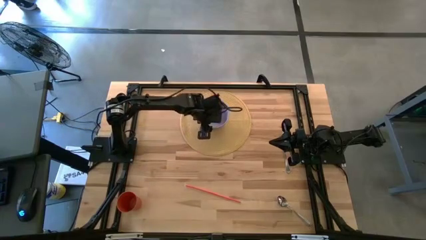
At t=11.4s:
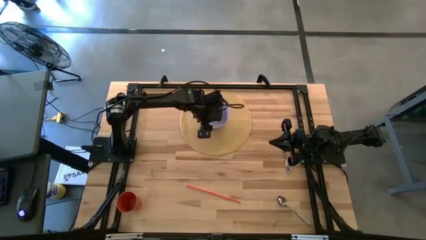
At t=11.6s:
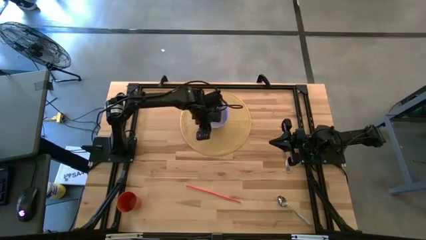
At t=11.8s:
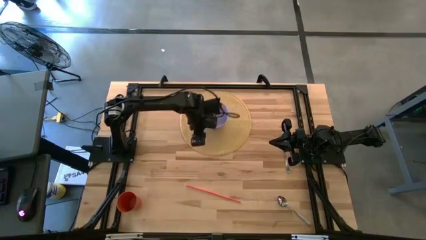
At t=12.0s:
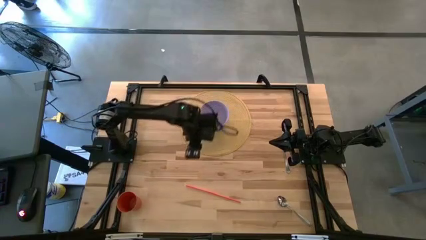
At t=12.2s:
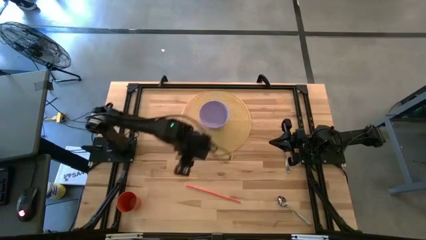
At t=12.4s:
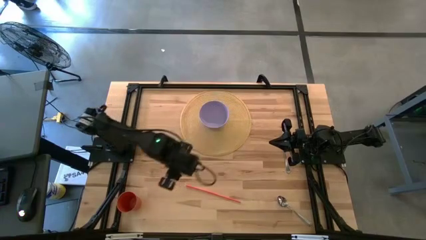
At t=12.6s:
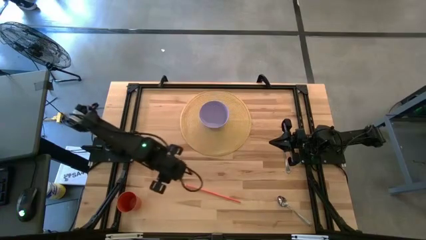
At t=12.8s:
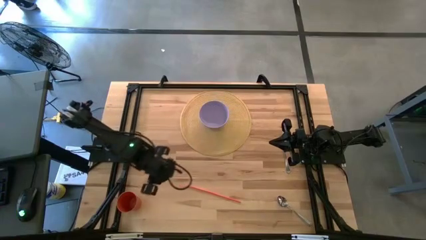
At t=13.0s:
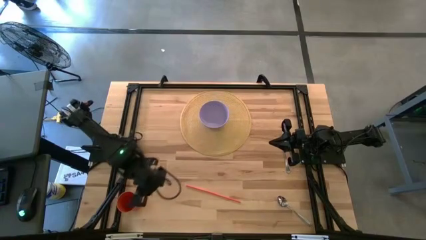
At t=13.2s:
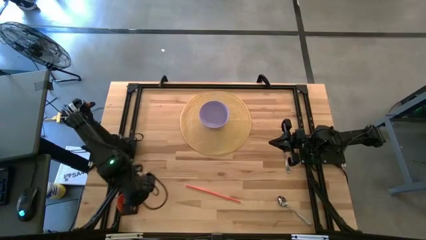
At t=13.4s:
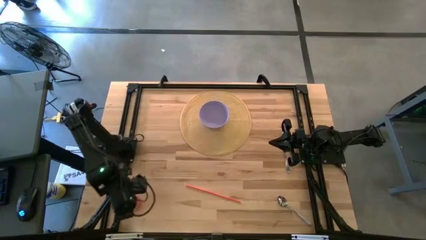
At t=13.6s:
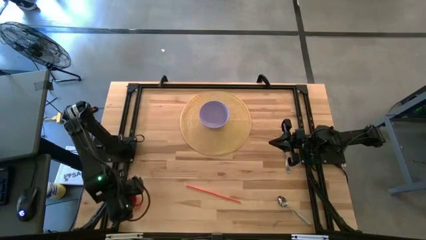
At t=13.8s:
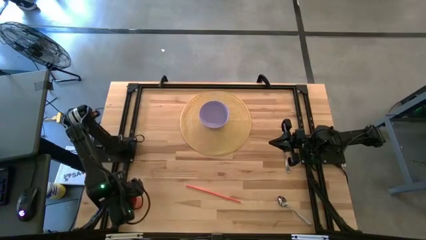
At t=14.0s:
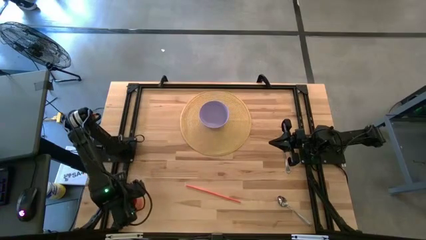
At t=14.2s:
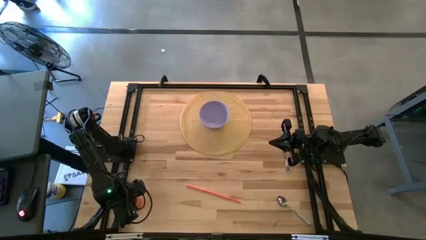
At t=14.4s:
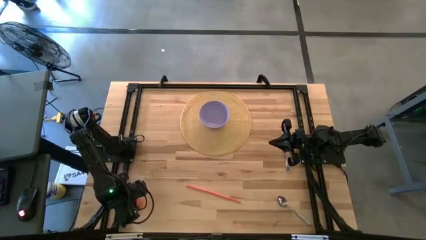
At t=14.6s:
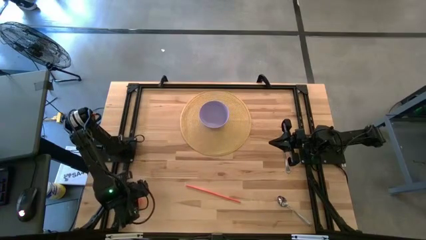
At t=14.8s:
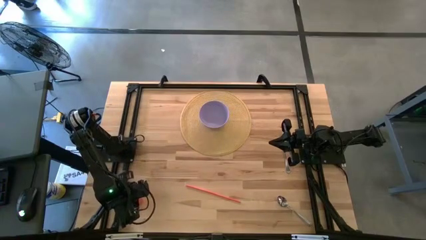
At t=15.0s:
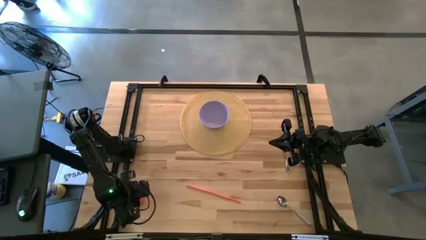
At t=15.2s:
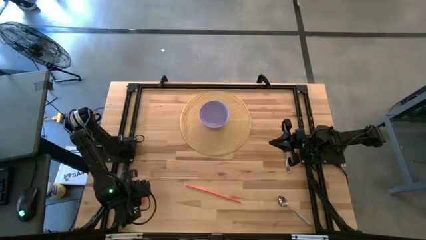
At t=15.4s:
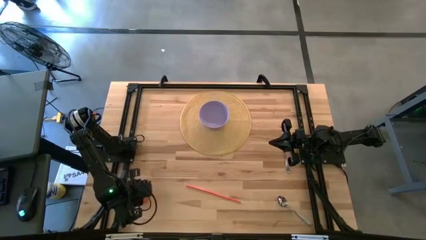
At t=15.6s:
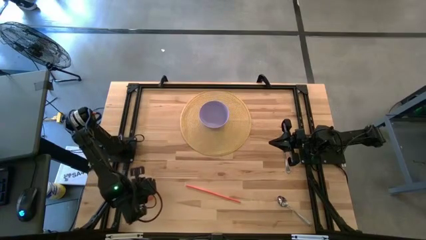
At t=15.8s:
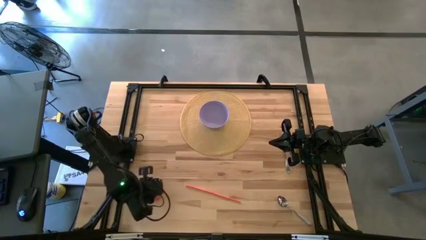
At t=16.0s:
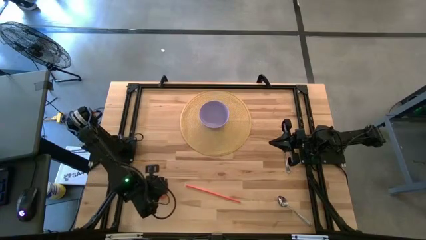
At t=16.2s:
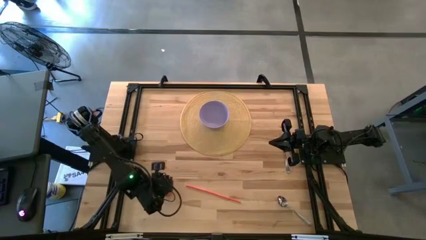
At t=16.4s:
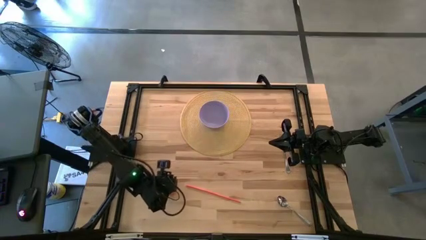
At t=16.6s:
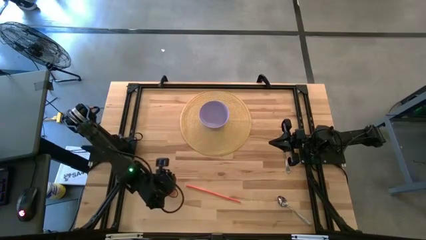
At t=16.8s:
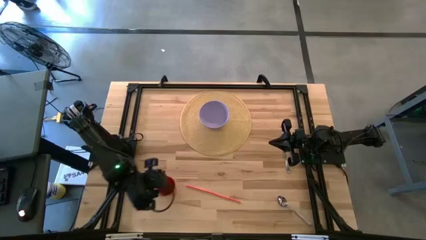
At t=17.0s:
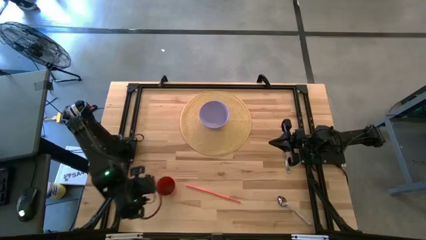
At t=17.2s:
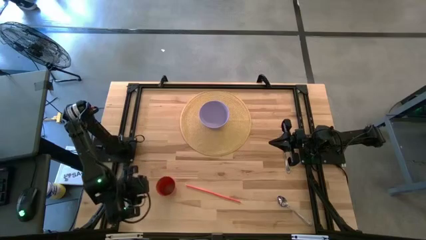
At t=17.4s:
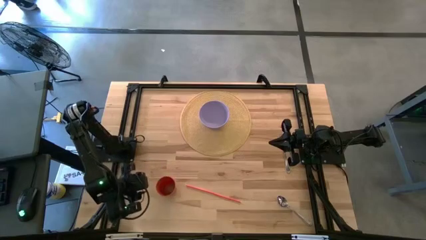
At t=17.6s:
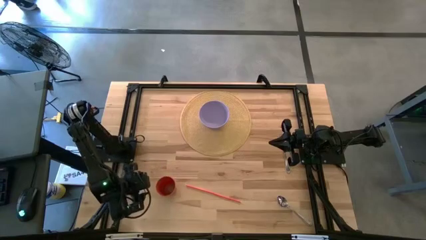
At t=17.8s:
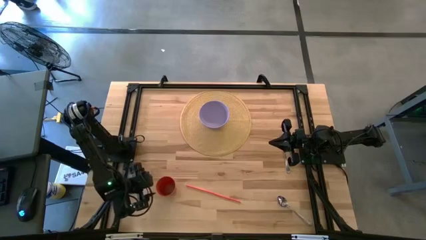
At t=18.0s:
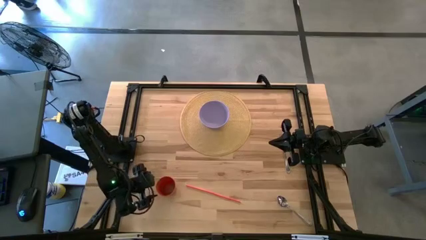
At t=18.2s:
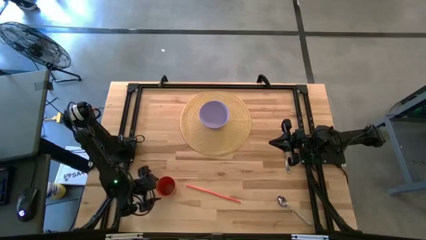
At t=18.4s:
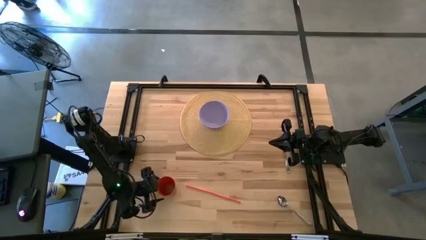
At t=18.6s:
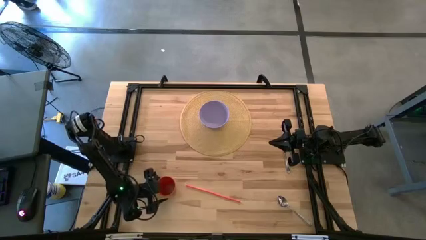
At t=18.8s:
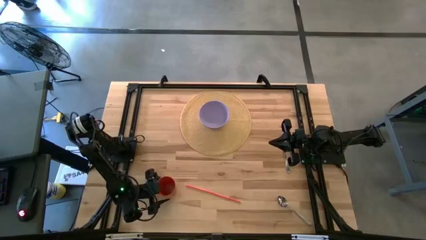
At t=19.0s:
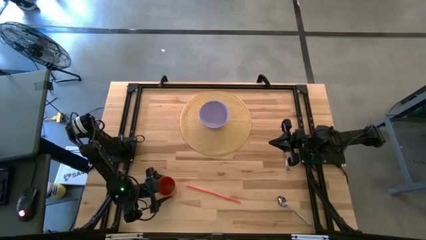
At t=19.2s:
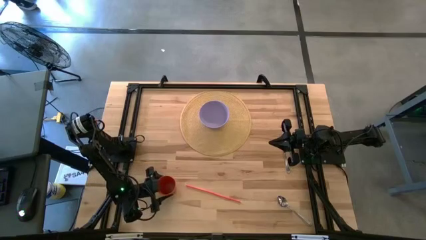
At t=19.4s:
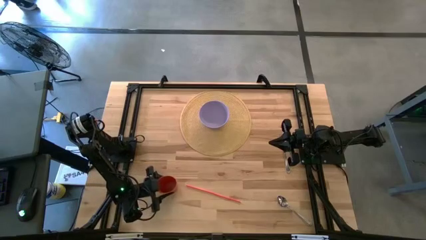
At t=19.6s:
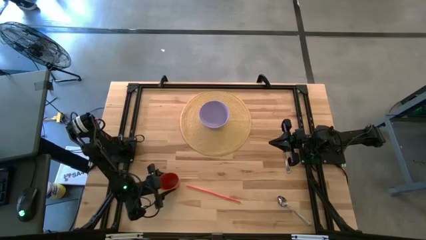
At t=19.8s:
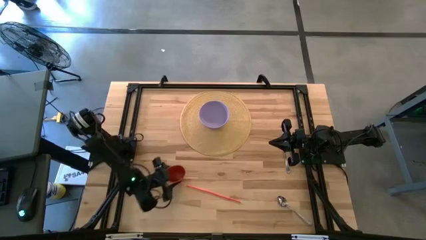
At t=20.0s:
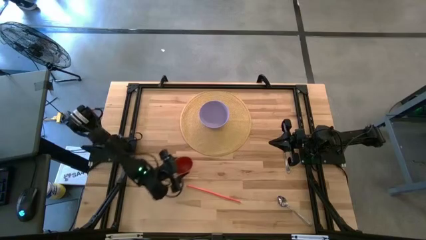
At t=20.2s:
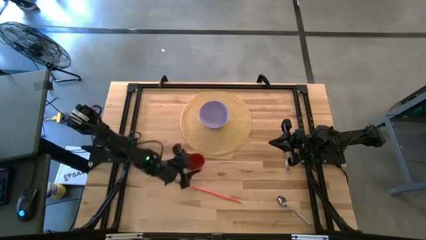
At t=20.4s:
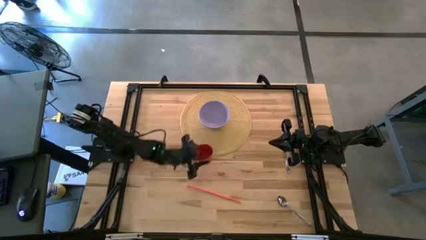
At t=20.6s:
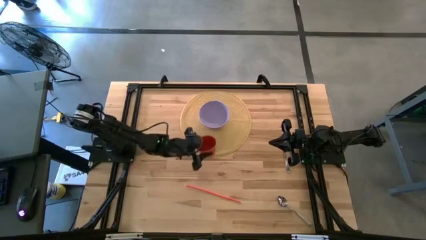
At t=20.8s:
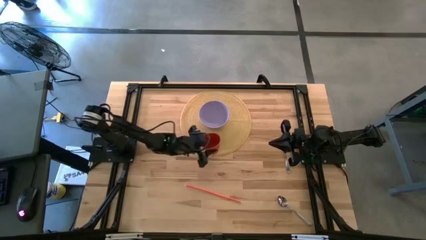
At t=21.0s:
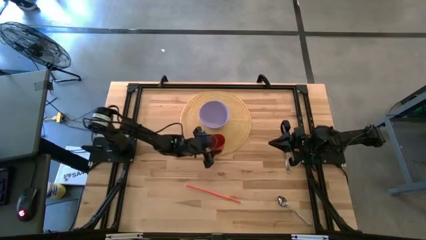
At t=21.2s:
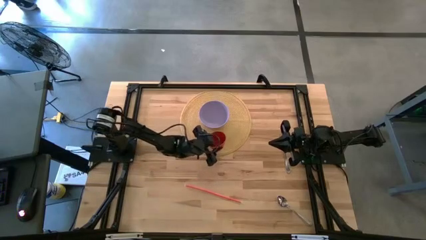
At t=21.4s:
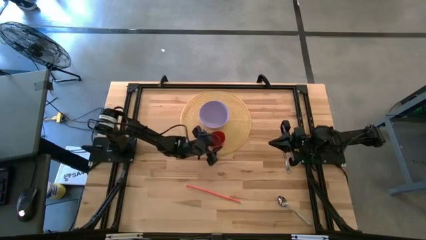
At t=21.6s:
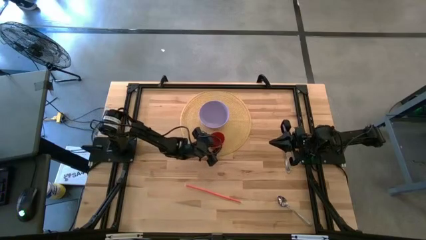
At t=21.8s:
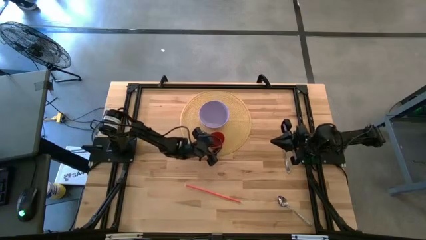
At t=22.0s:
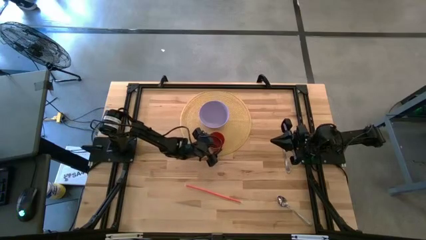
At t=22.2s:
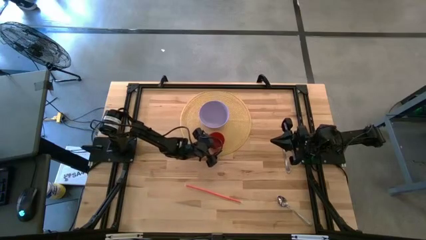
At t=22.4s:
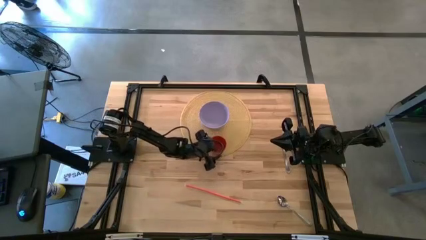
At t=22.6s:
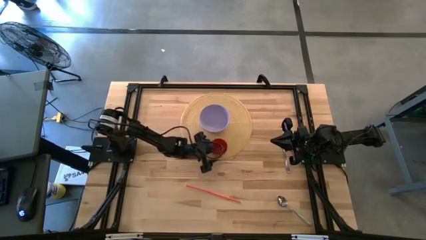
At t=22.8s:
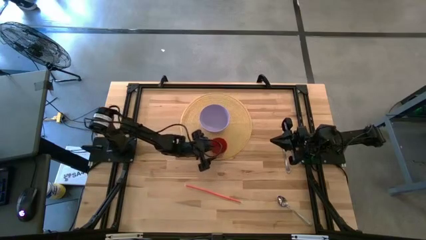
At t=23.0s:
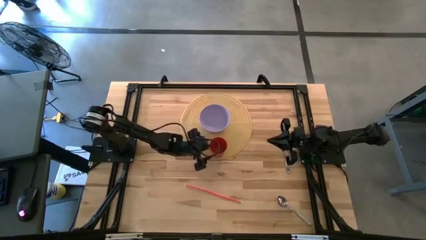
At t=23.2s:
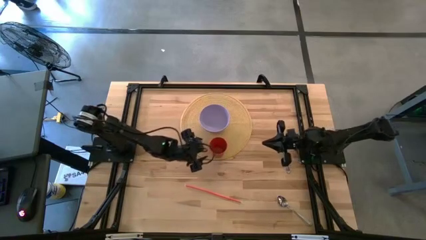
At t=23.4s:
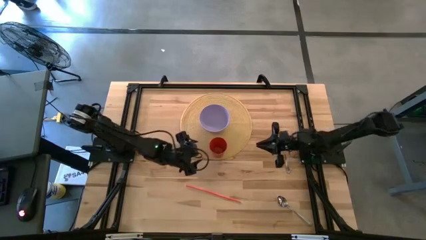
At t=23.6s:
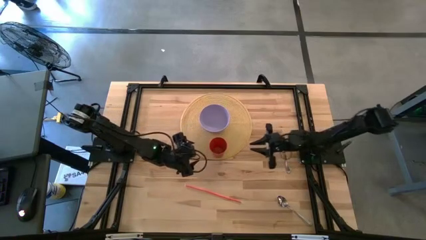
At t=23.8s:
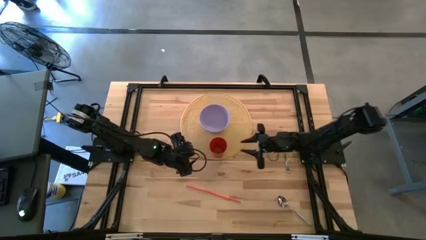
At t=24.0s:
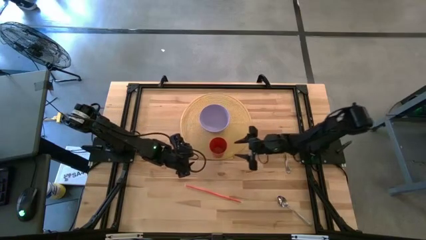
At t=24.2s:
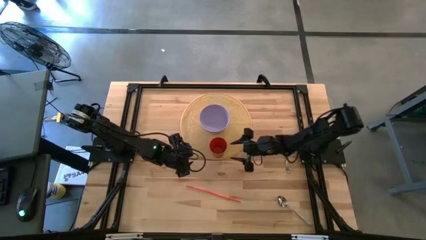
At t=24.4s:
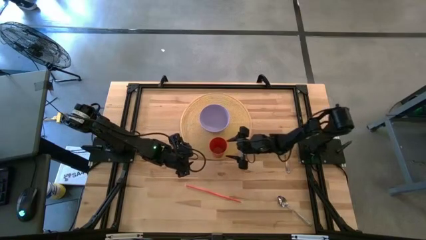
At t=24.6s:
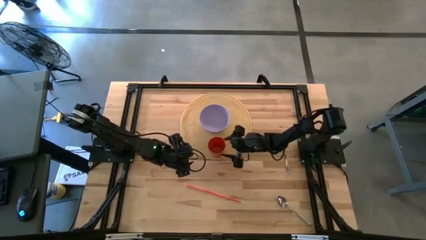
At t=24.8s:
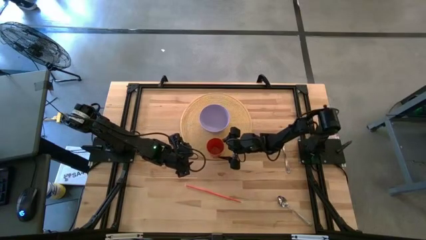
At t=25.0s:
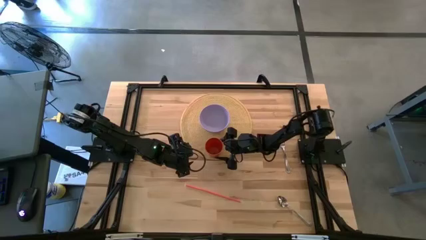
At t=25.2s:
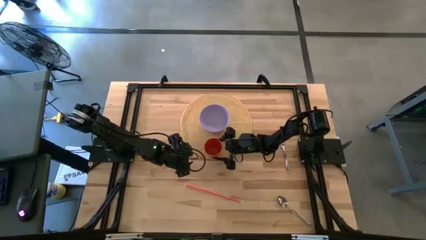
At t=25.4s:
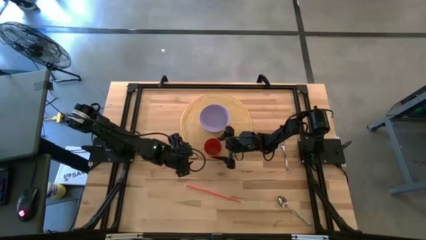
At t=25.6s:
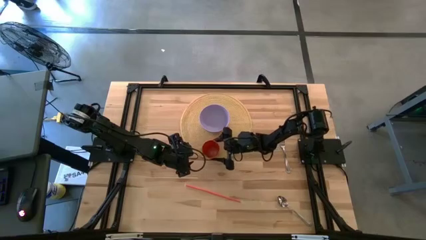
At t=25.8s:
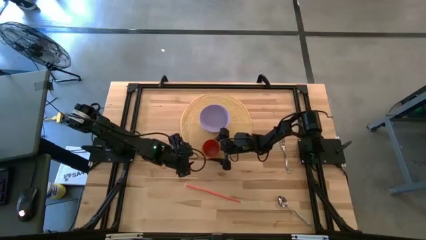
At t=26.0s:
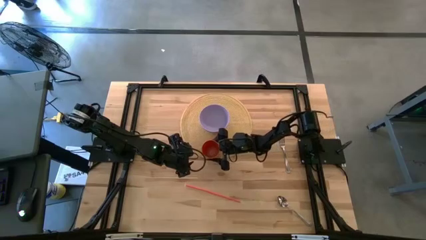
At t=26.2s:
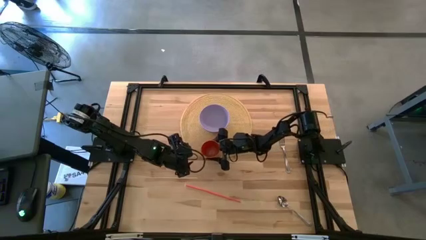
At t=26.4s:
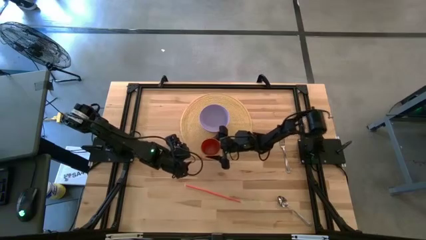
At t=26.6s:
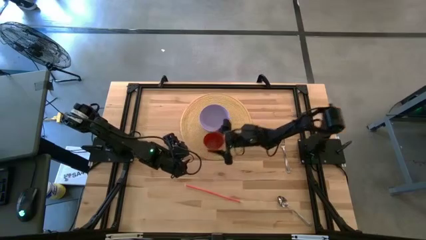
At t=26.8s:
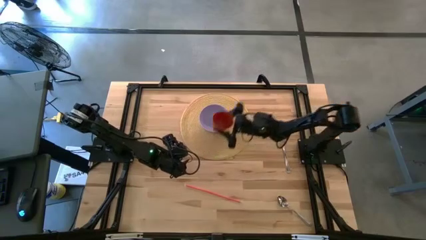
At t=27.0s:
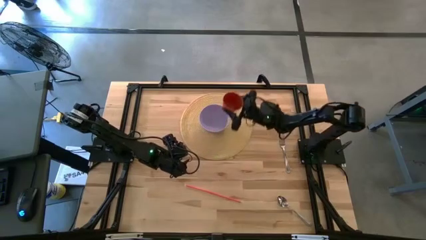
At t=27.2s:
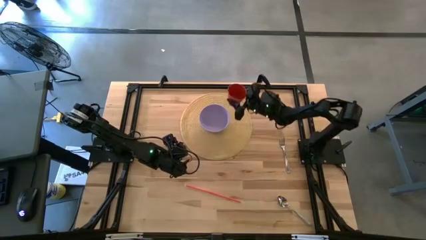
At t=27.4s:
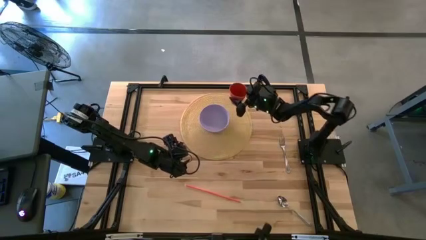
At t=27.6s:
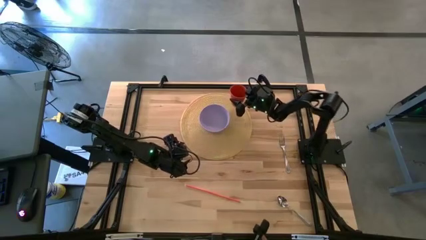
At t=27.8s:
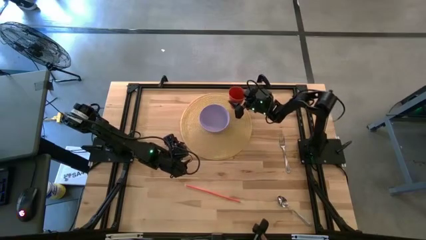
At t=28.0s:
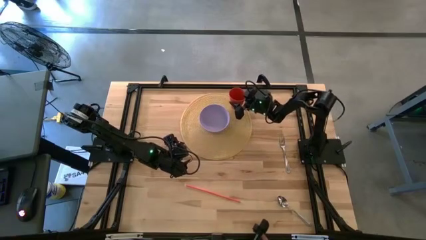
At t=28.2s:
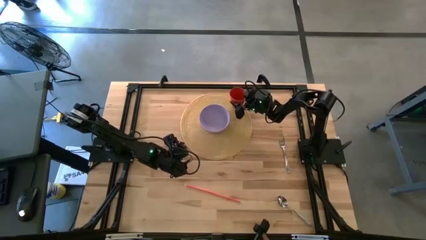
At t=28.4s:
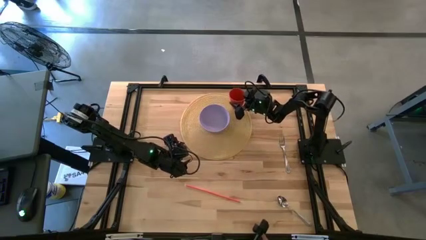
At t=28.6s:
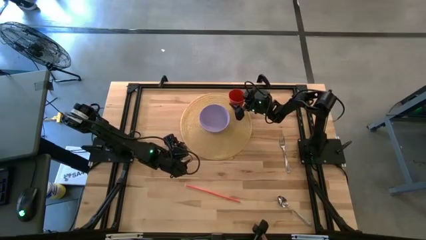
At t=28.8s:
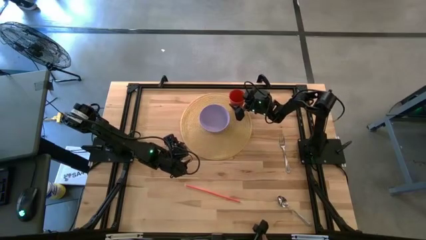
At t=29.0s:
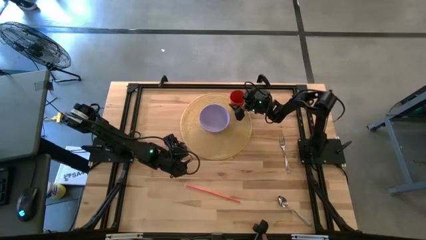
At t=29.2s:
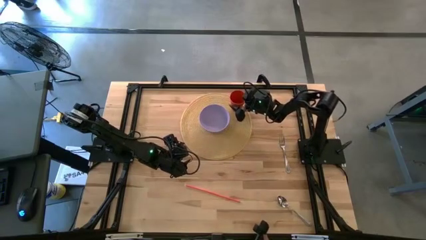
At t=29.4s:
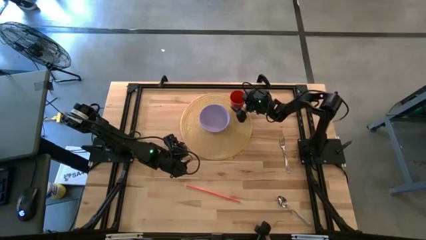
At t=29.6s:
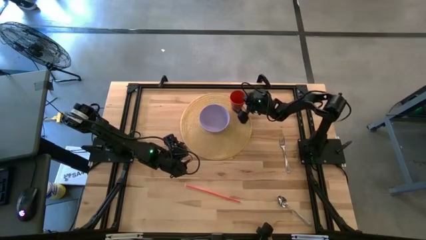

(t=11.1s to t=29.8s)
Task: Pick & Place Utensil
Put the orange cup to the right side of the bowl on the table placemat
